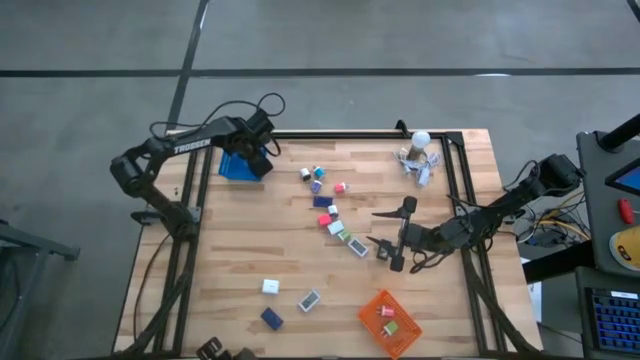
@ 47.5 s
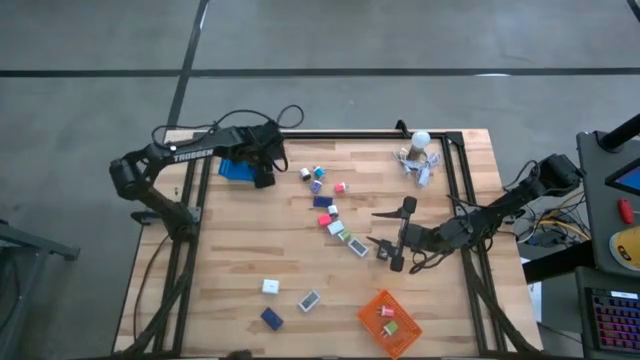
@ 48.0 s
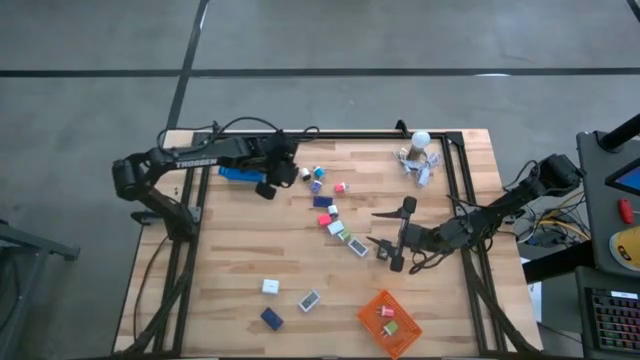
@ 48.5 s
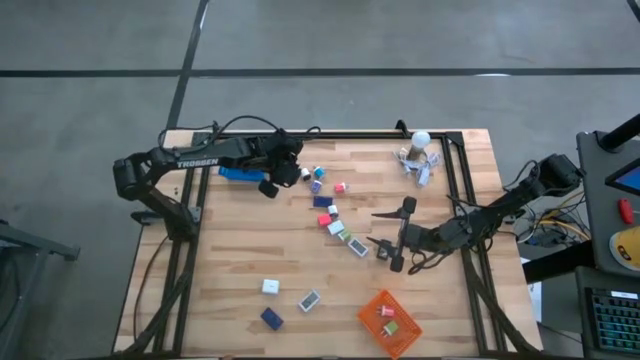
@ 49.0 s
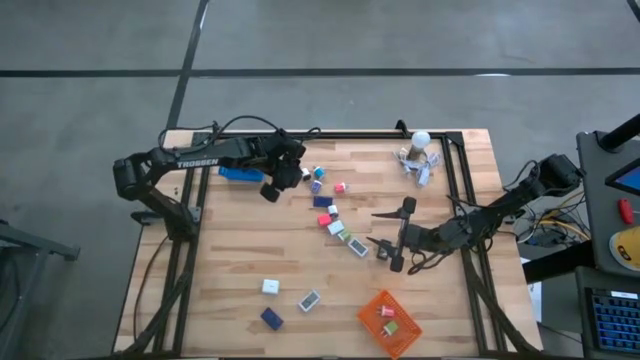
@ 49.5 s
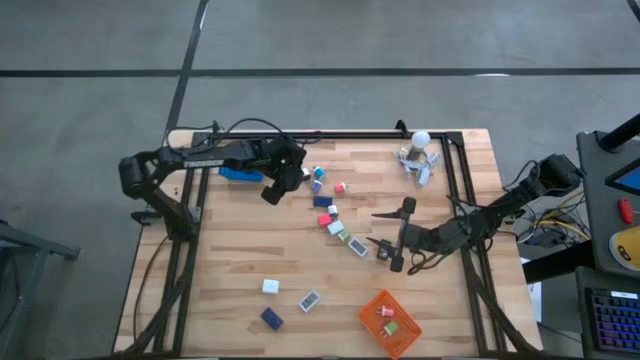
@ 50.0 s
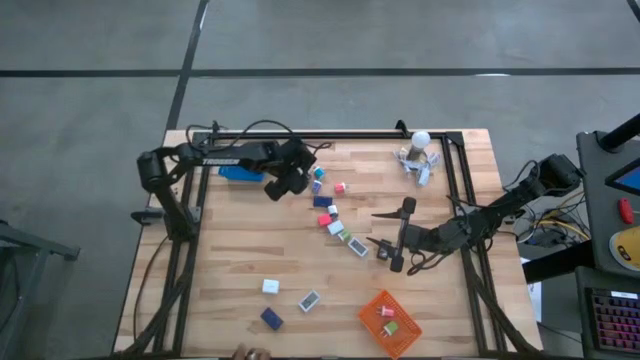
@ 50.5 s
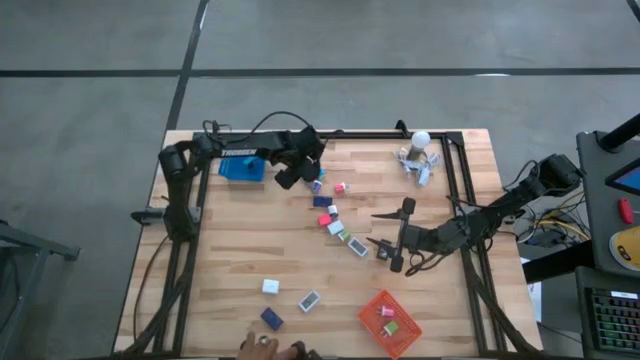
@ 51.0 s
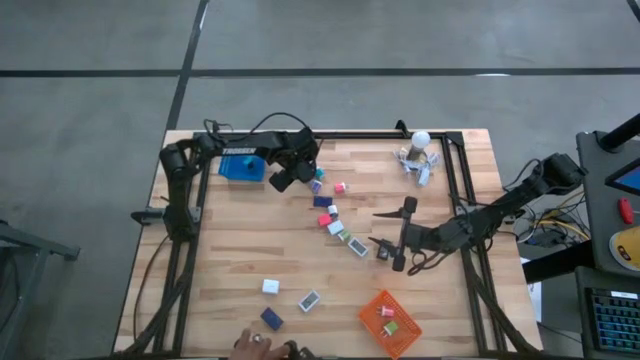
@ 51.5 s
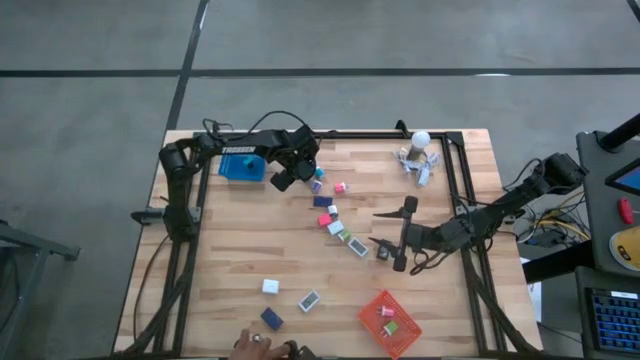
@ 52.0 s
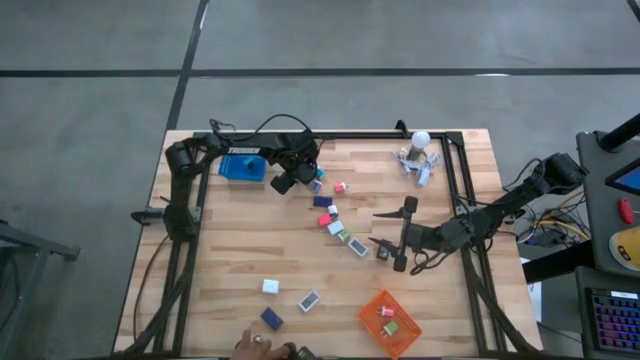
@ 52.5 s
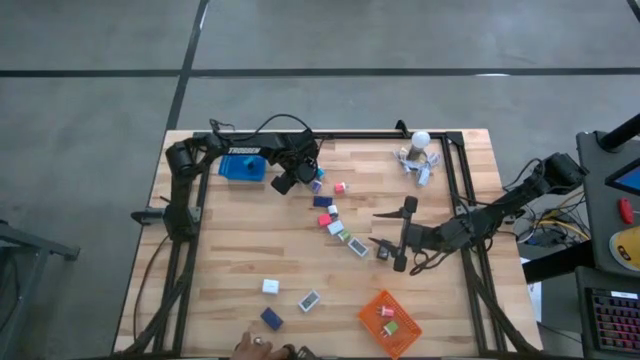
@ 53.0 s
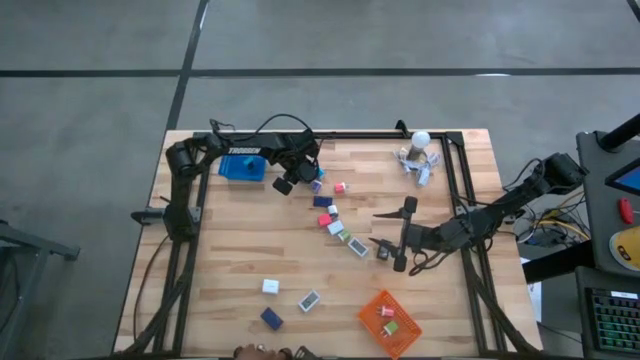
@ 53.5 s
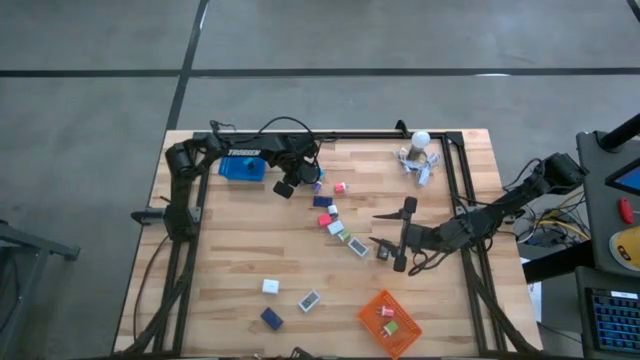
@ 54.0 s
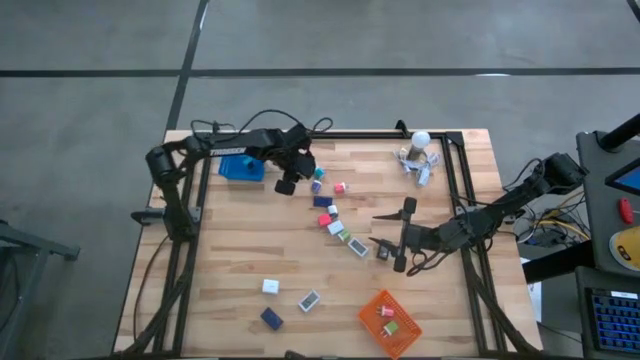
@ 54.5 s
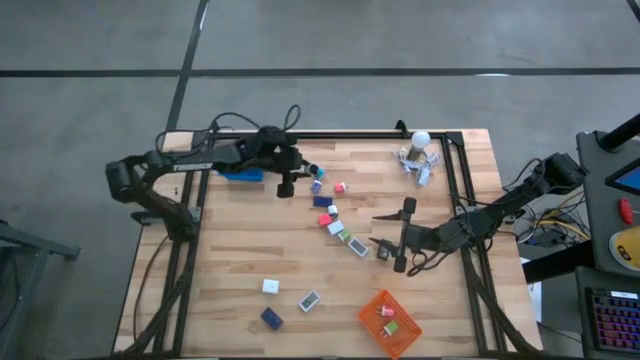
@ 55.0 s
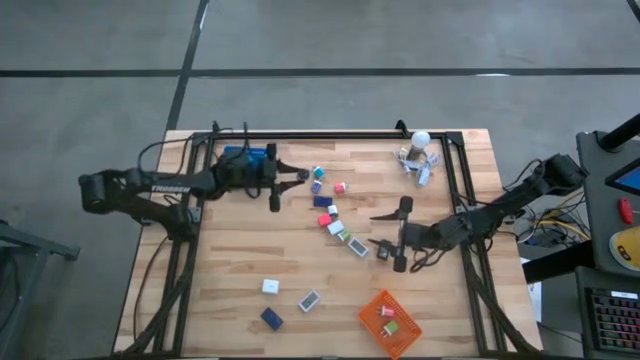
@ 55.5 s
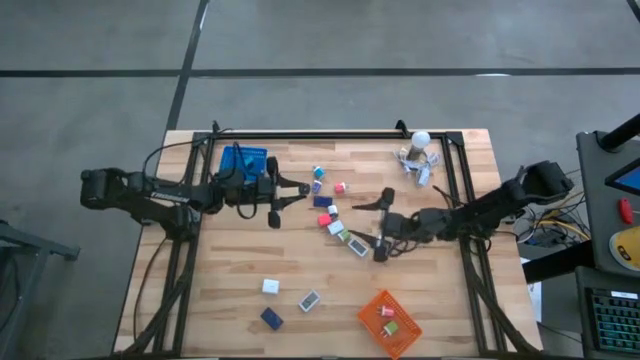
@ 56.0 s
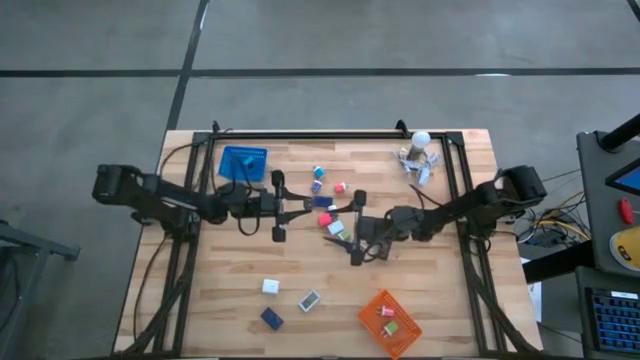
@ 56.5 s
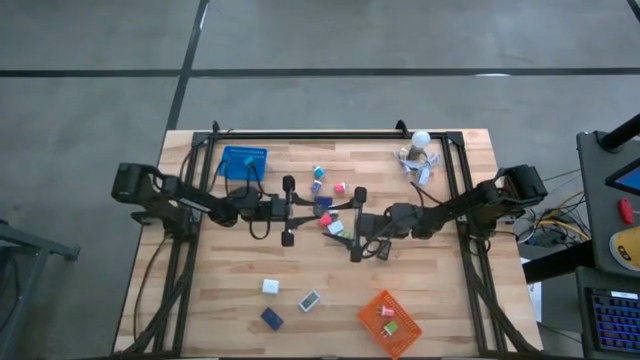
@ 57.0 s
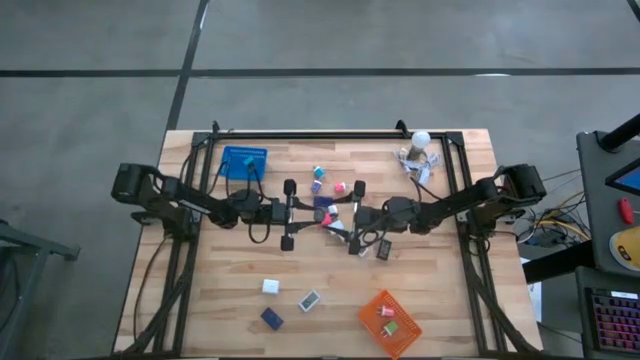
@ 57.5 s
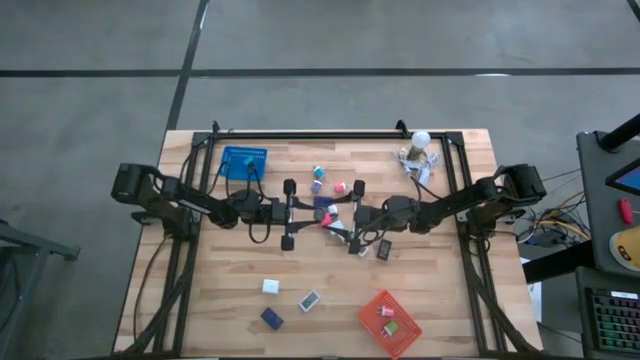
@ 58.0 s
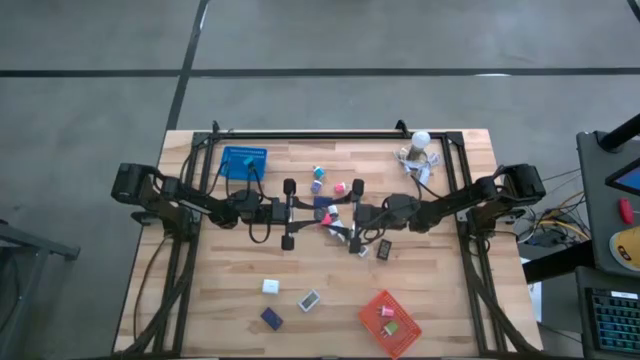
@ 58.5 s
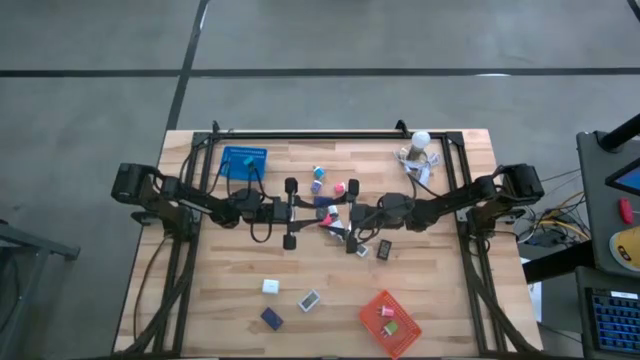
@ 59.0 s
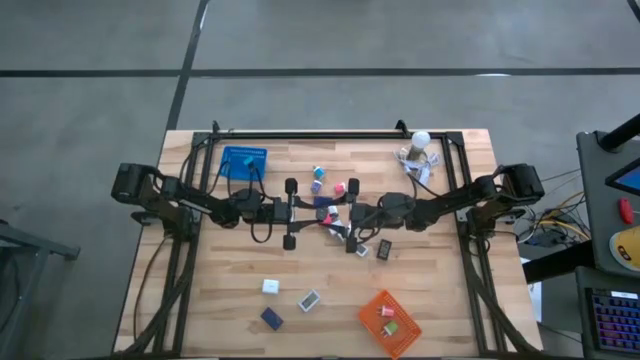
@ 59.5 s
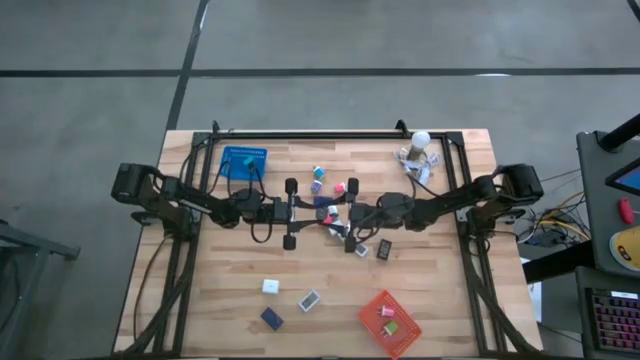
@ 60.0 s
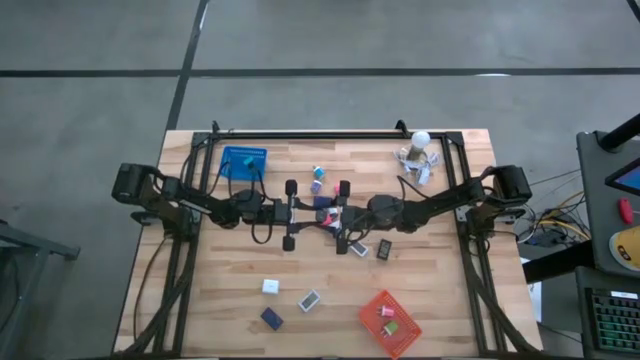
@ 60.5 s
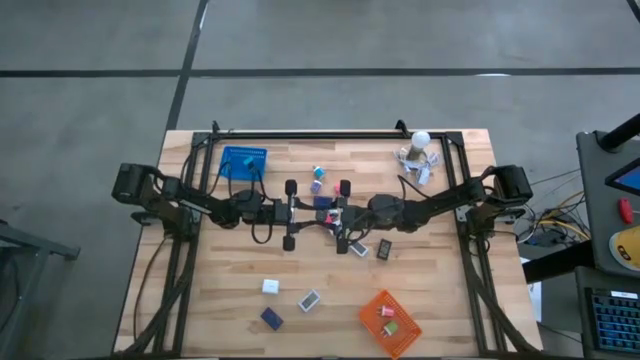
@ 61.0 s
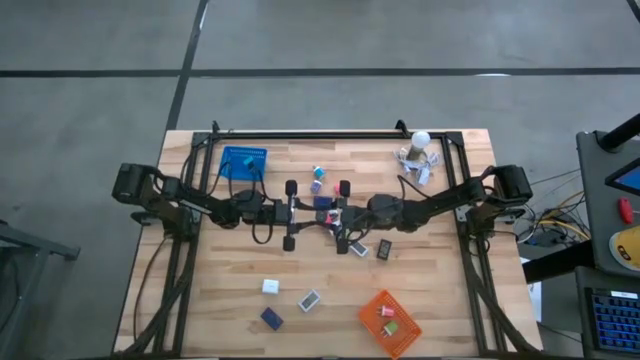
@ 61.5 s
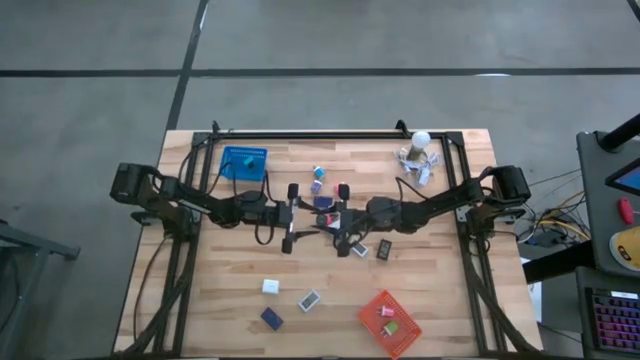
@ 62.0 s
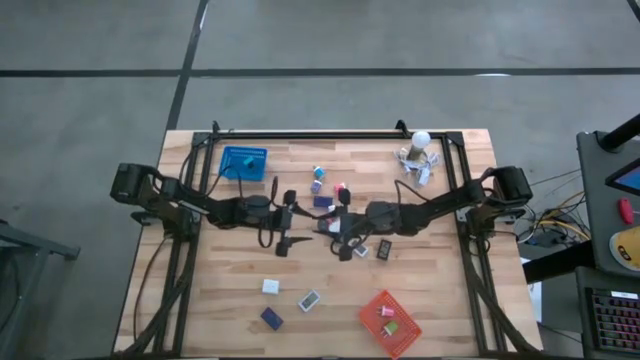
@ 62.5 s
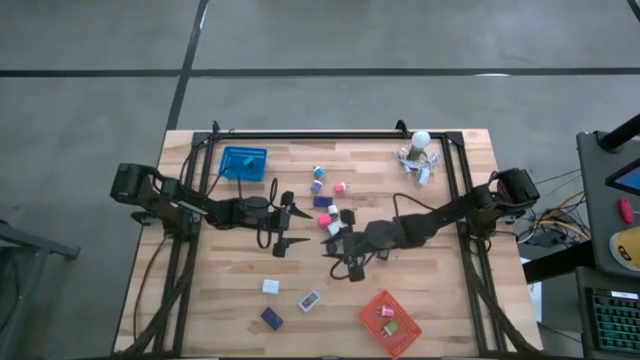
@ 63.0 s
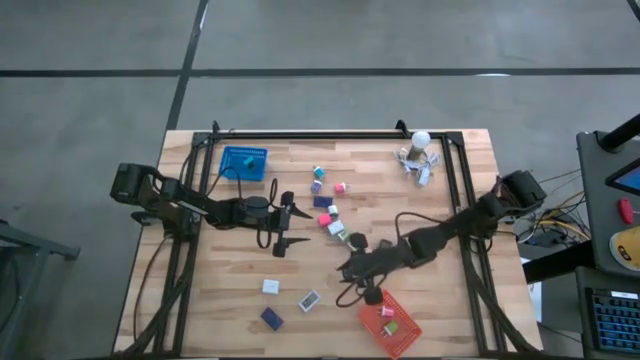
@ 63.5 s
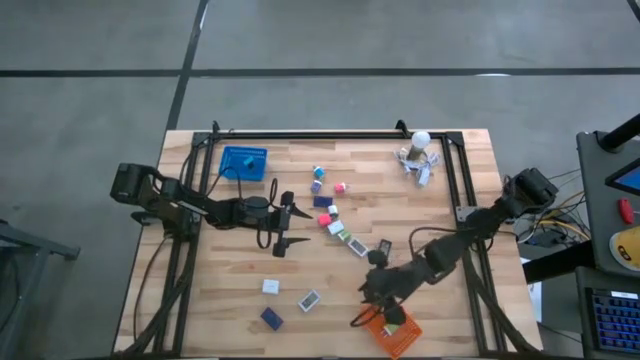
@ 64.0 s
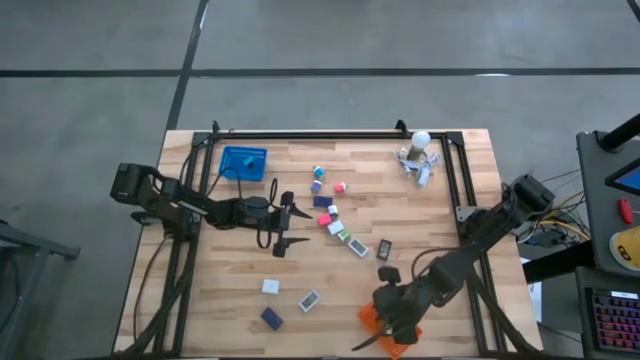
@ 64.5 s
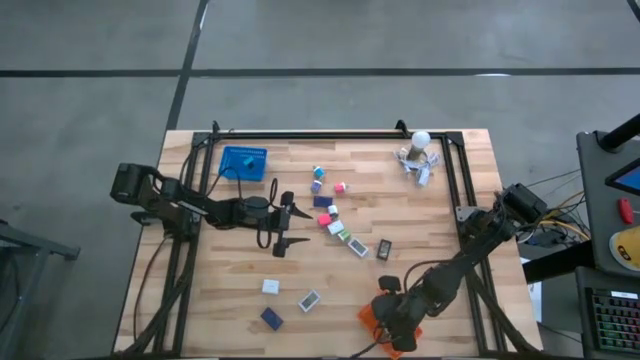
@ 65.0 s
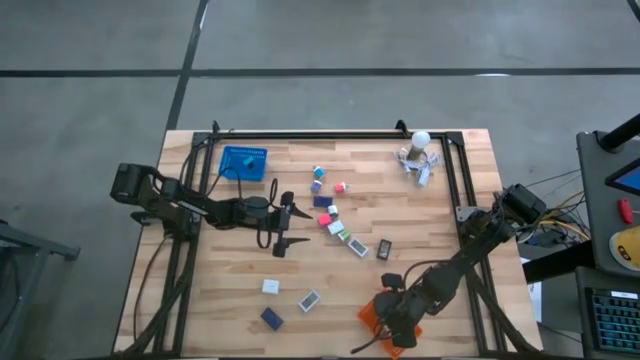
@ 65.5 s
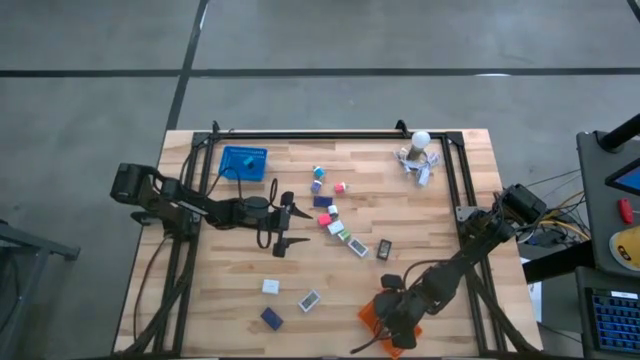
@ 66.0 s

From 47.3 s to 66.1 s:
Task: Pick & Place Office items
Put the top white and black charger adapter into the orange bin

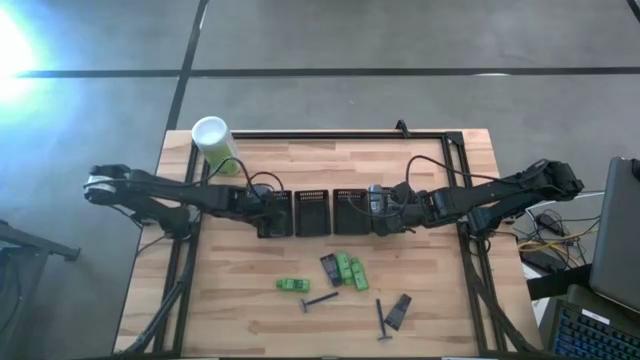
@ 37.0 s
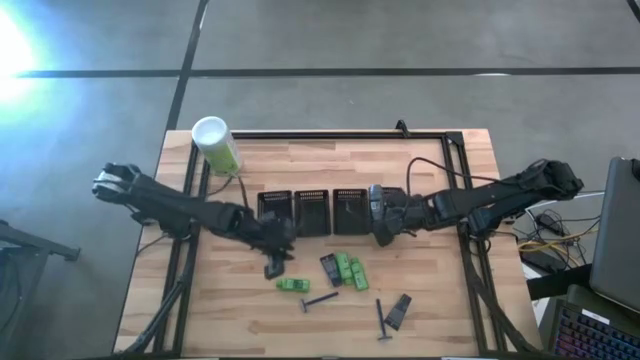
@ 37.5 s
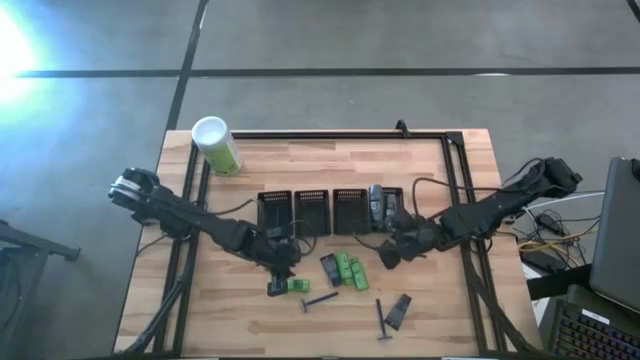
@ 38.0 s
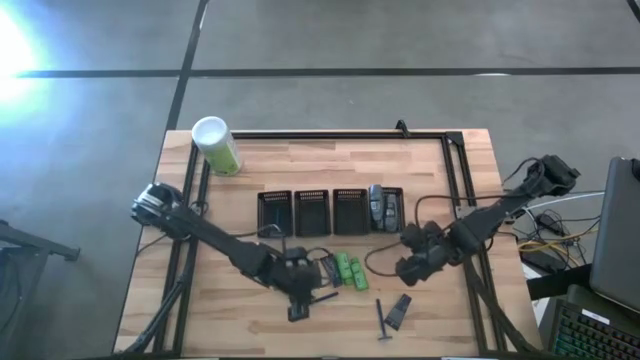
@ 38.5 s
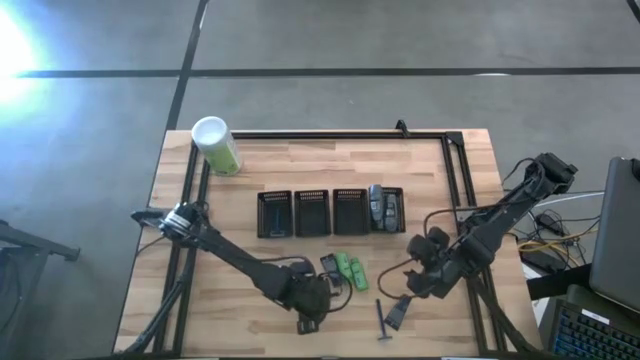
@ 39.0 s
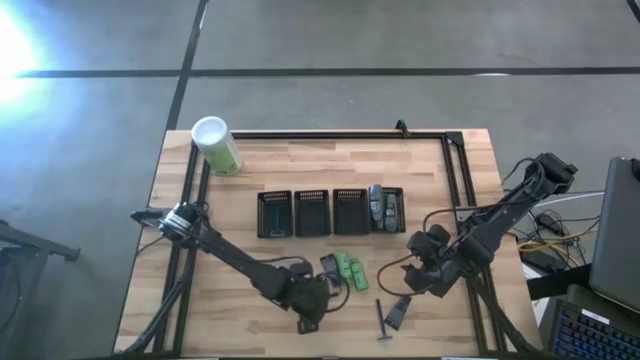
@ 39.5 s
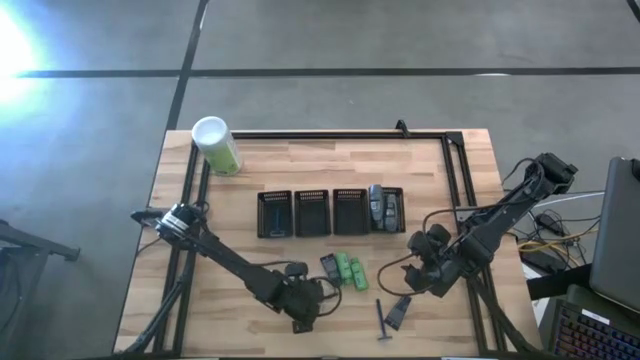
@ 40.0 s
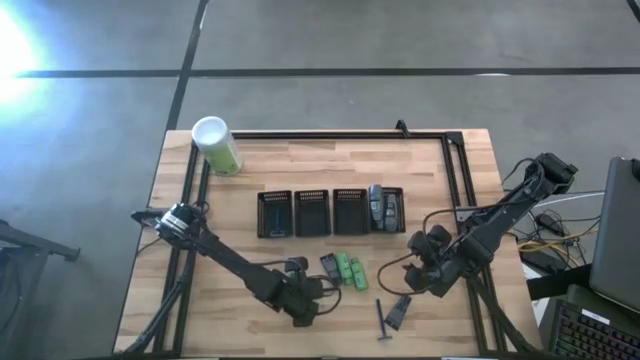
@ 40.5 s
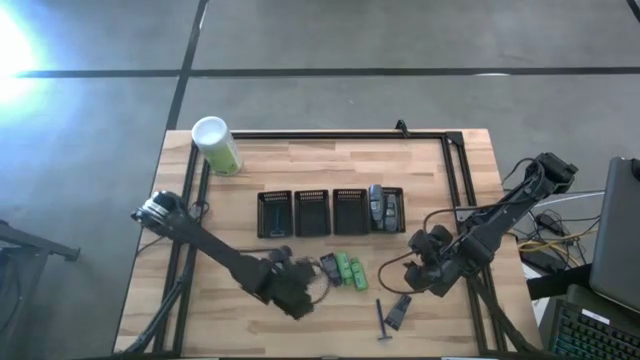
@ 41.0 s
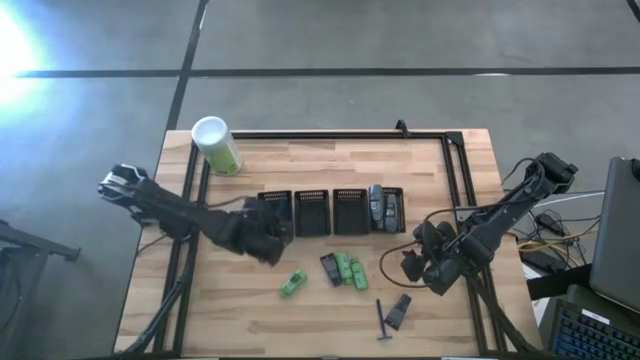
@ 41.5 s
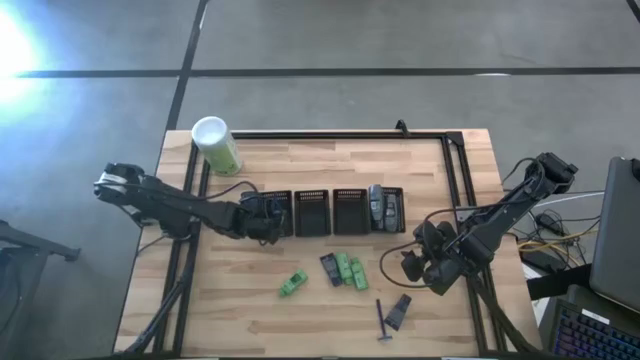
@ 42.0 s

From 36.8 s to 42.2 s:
Task: Pick & Place Travel size toiletries
Put the blue razor into the left black basket
